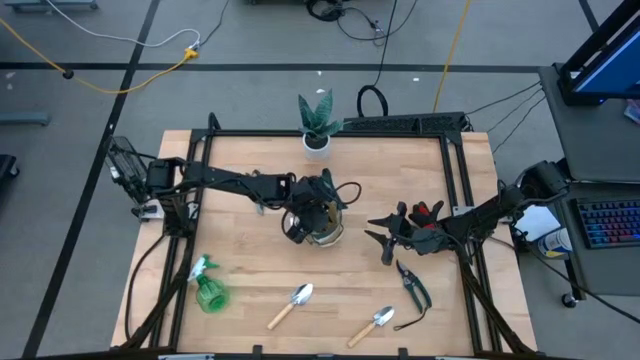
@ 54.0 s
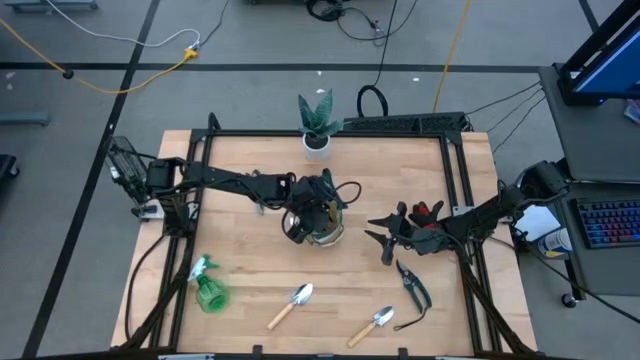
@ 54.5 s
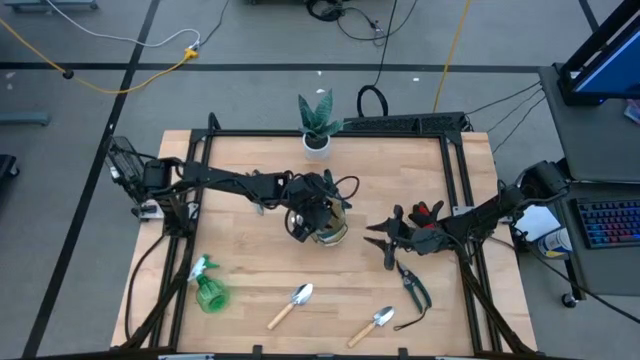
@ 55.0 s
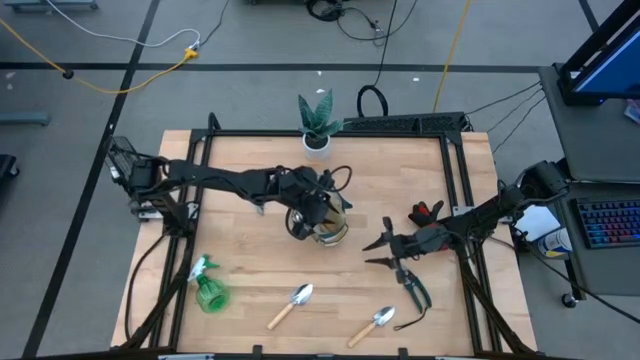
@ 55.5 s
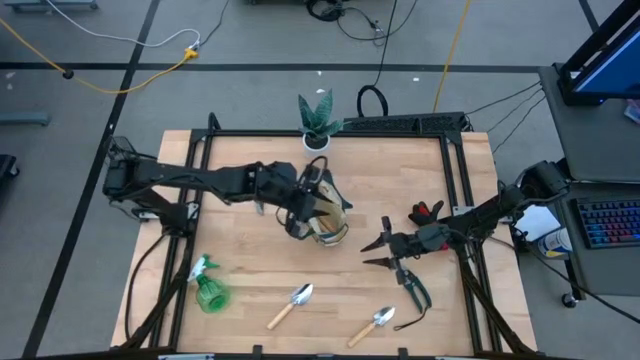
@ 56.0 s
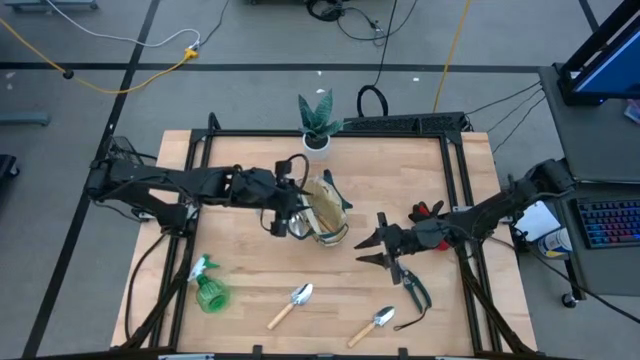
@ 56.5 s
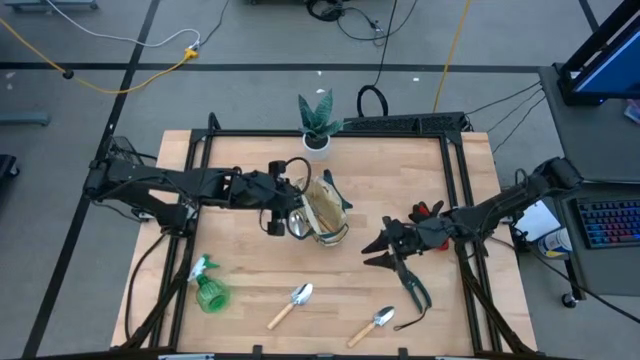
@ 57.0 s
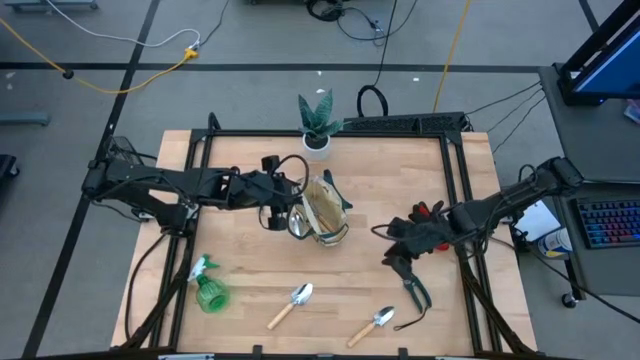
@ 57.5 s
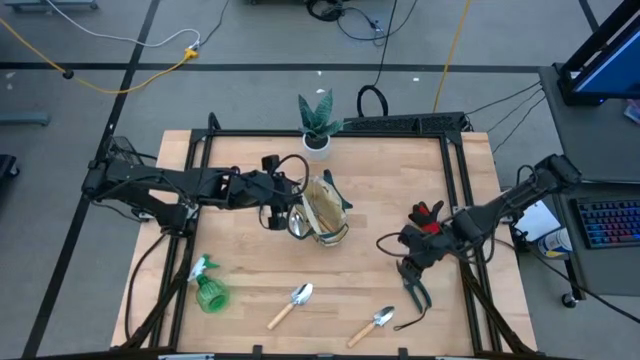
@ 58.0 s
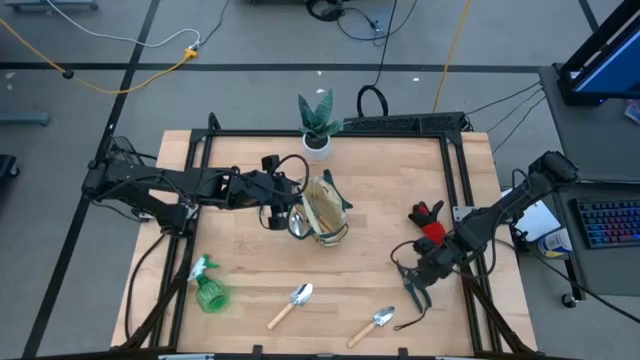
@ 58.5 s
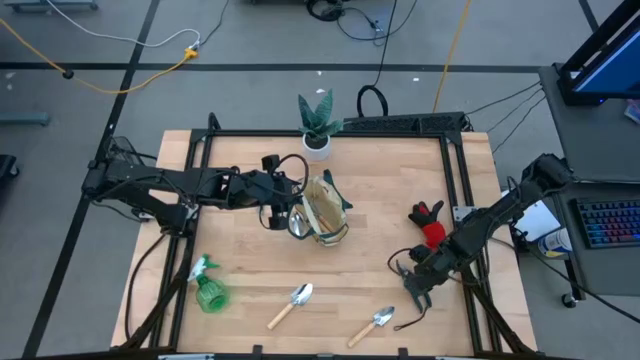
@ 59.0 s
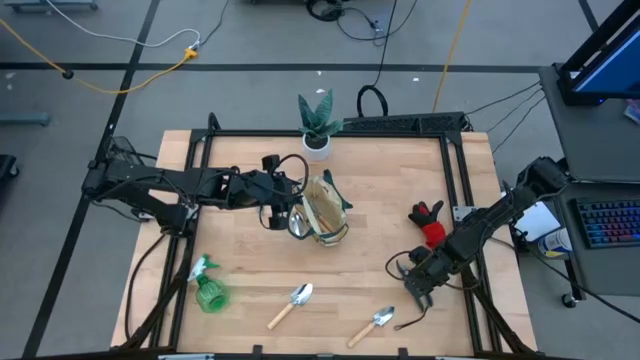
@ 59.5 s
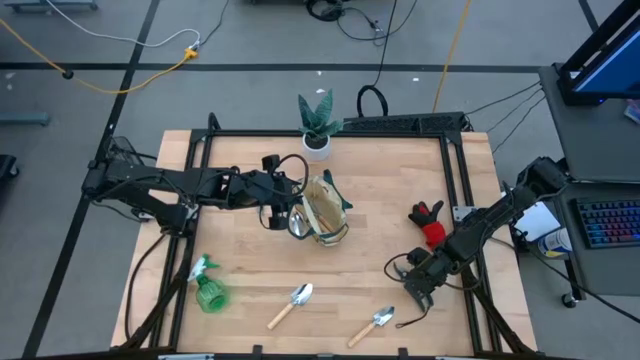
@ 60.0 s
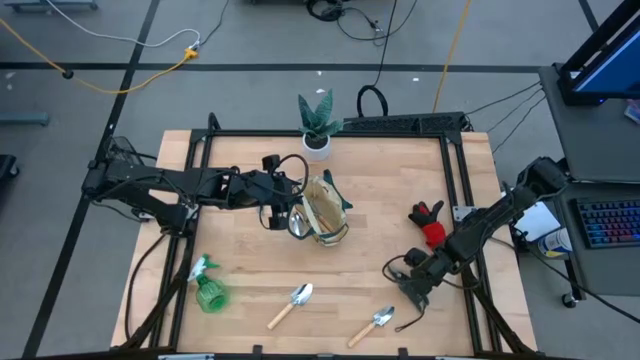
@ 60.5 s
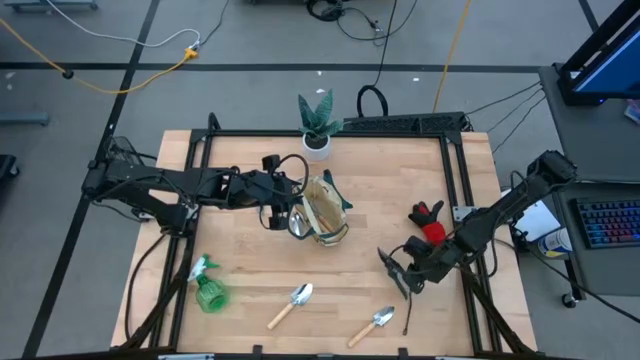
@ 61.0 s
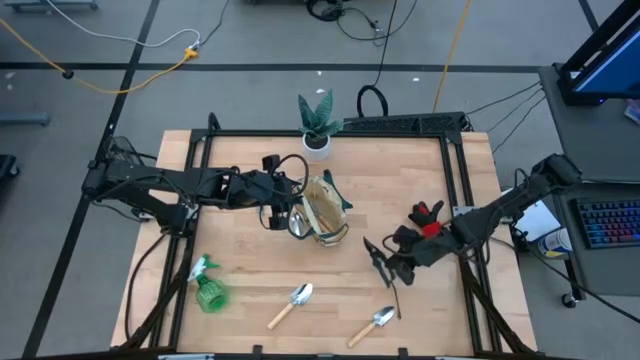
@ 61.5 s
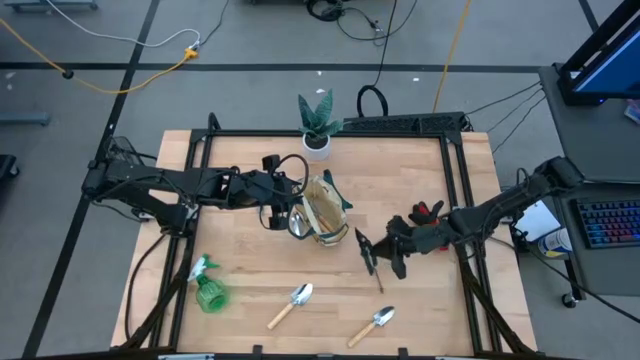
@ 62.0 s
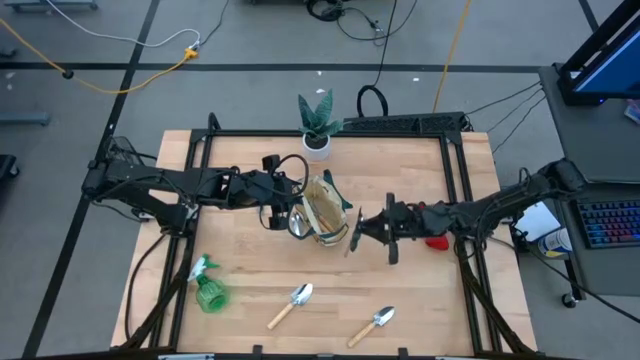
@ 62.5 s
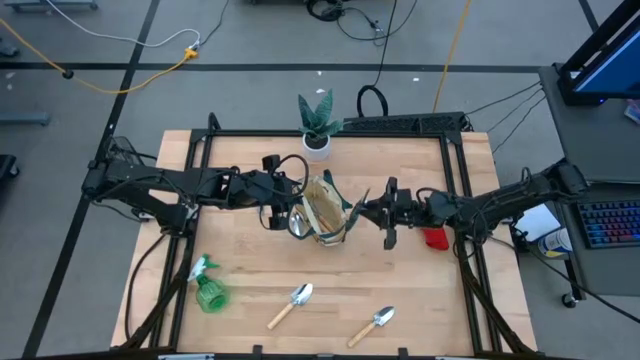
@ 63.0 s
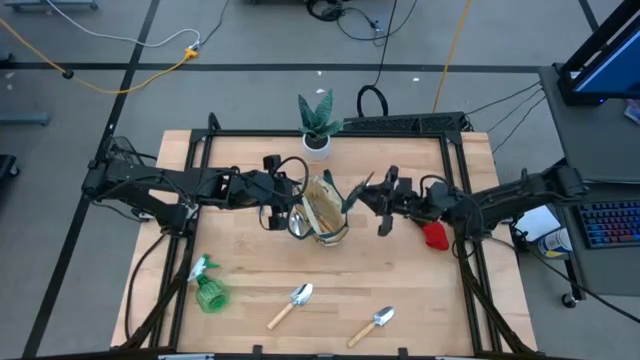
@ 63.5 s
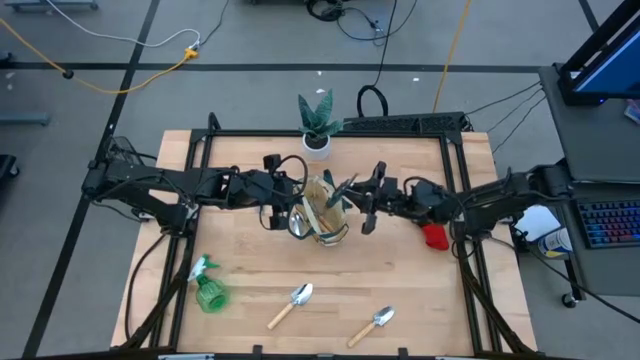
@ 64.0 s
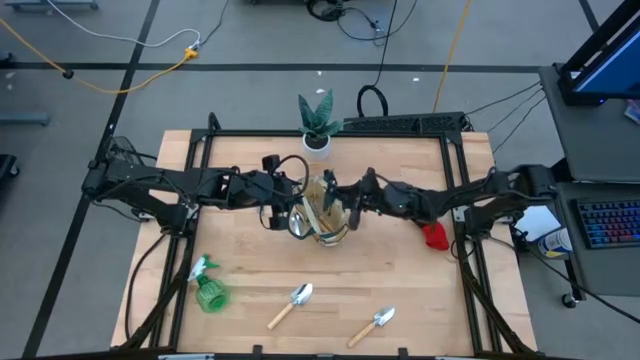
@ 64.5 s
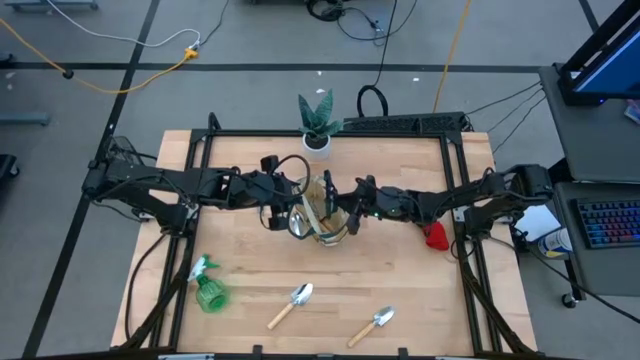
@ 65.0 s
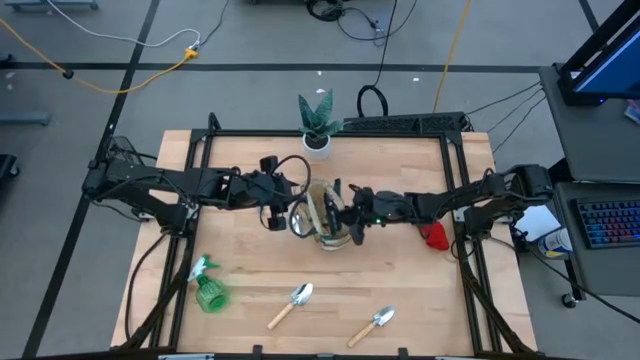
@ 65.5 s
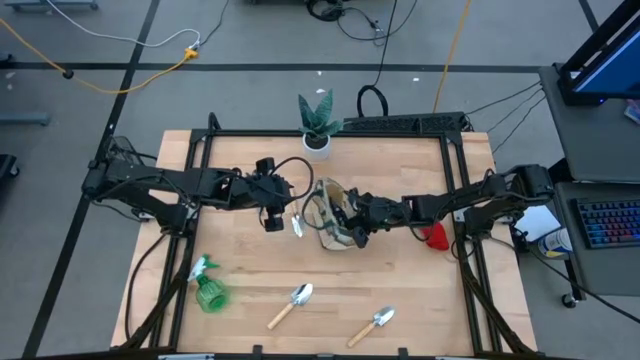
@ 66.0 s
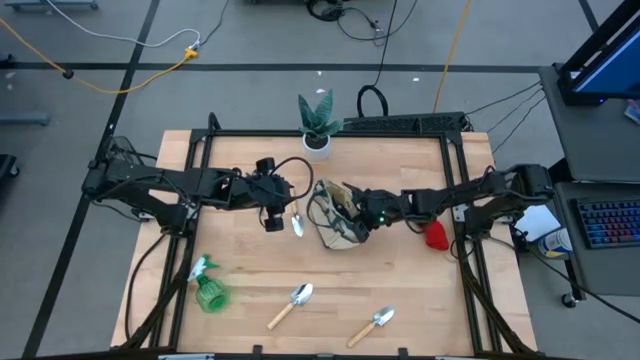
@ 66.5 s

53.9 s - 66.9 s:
Task: Pick & Place Garden tools in Gardening bag
Put the bottom green shear scissors into the gardening bag

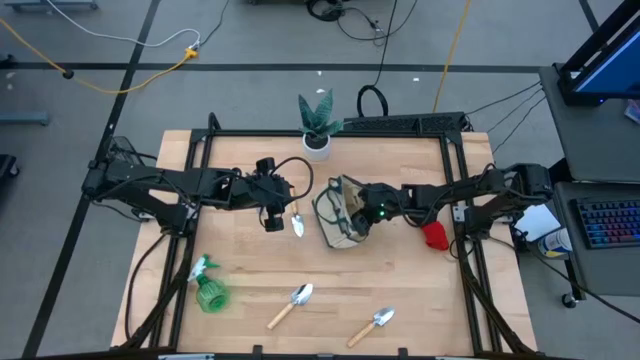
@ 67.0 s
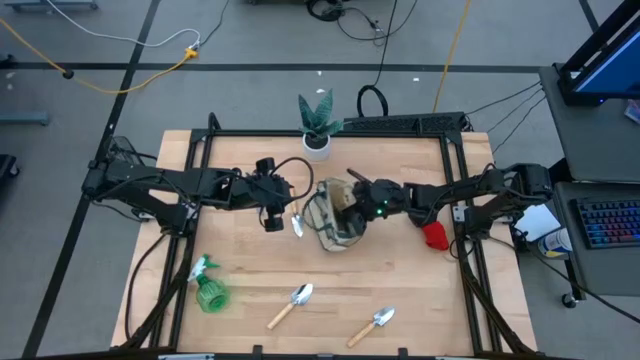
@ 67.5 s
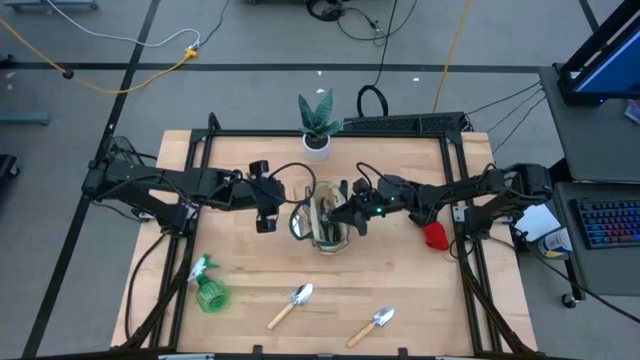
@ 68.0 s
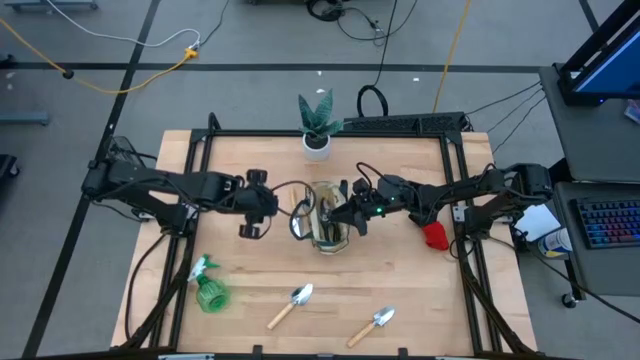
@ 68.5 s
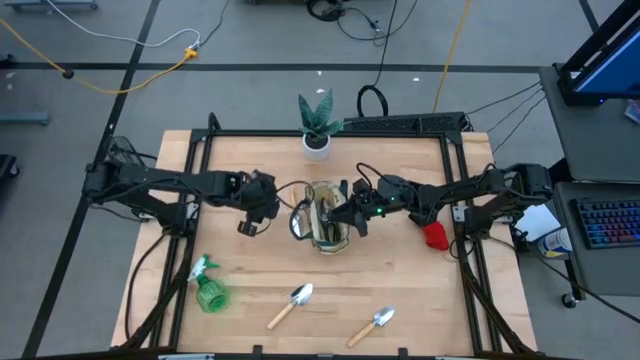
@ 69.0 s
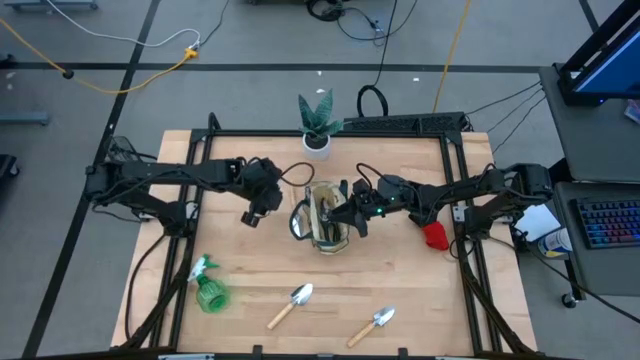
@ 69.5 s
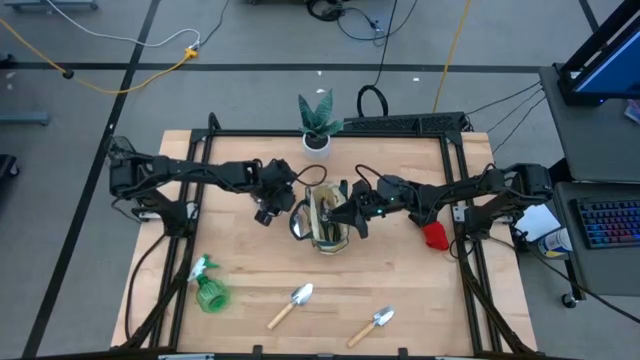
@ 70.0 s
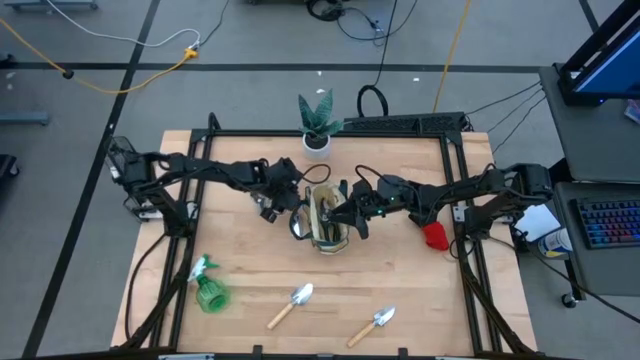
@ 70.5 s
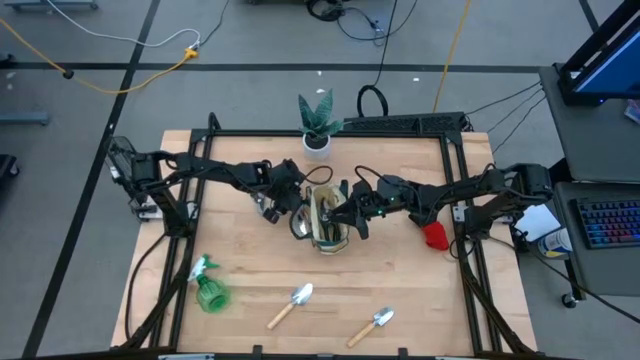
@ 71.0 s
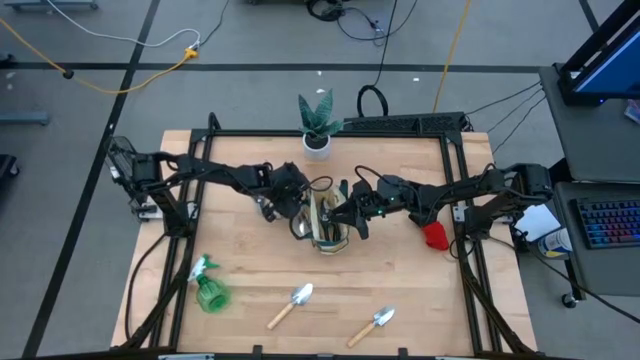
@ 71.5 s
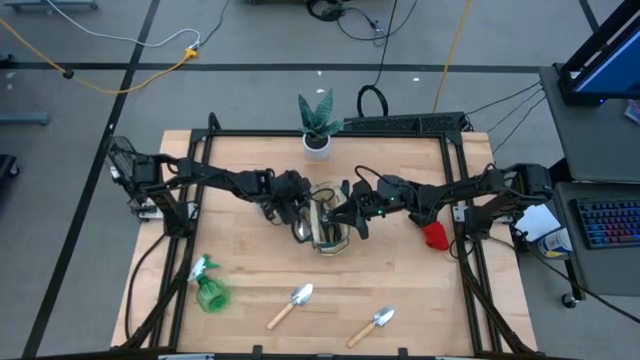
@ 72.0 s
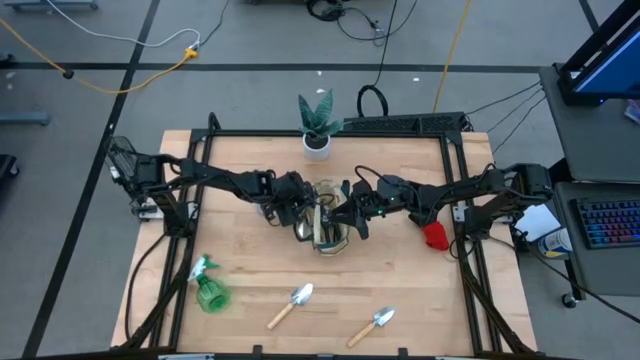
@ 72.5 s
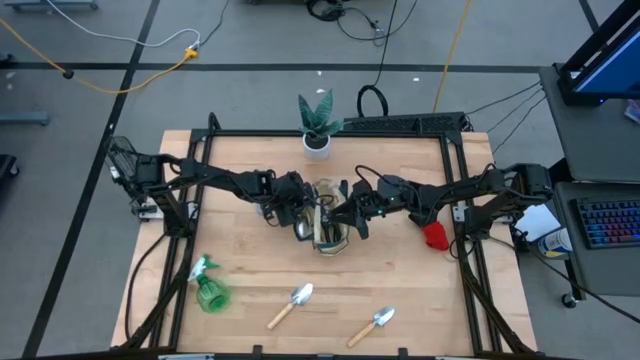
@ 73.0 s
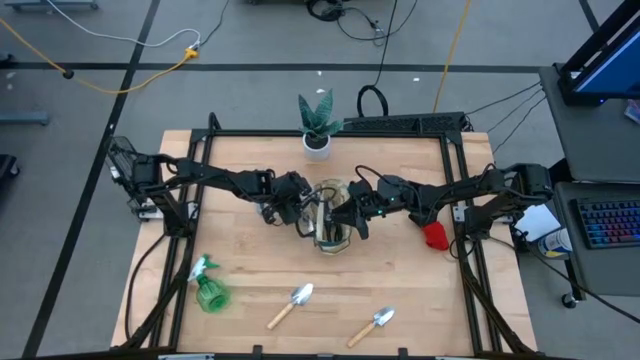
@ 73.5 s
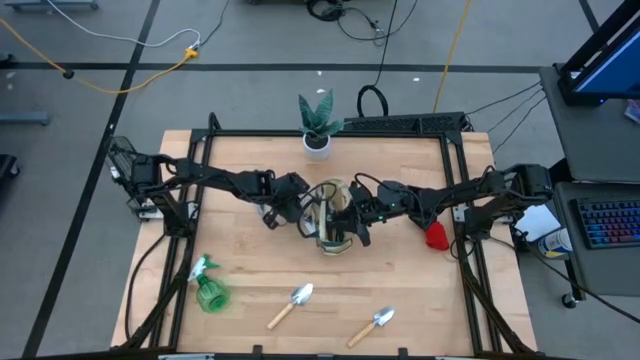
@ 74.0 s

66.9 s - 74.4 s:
Put the top brown trowel into the gardening bag
